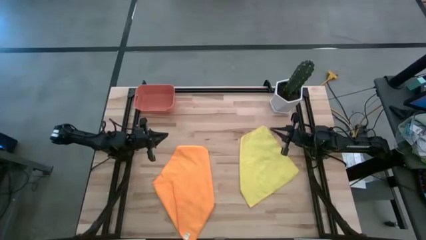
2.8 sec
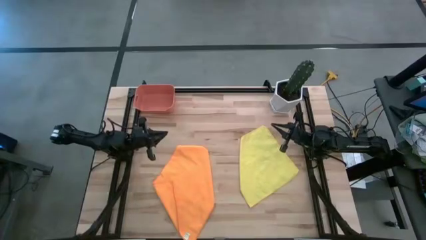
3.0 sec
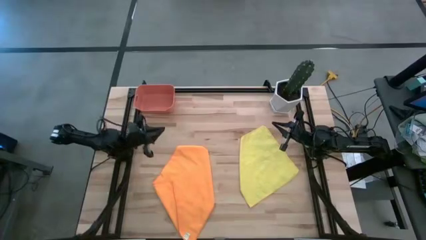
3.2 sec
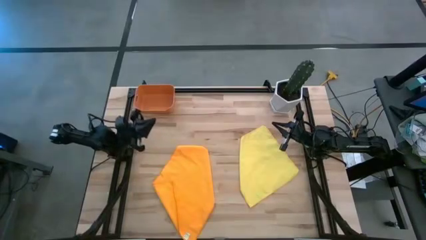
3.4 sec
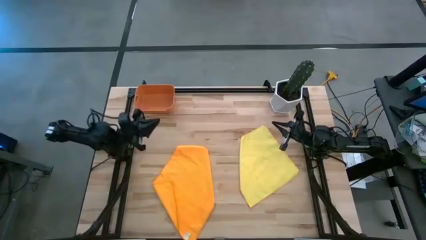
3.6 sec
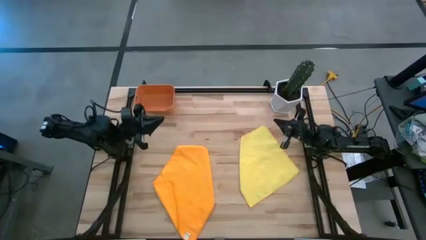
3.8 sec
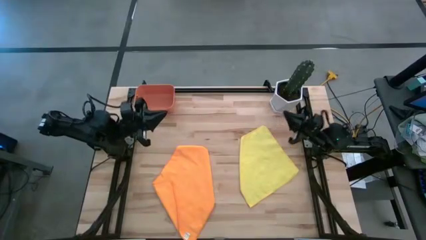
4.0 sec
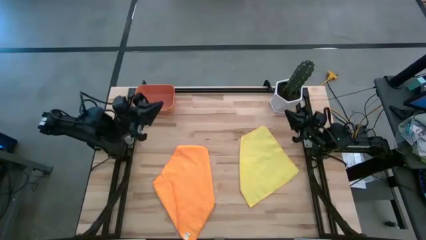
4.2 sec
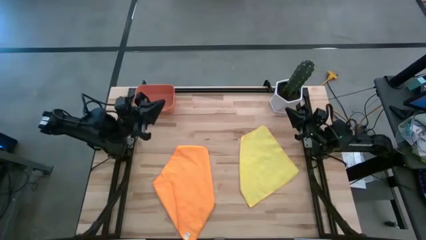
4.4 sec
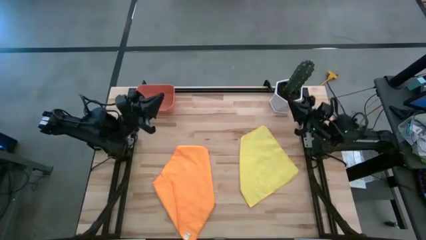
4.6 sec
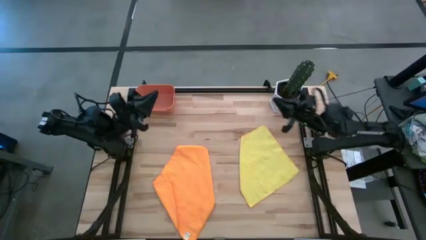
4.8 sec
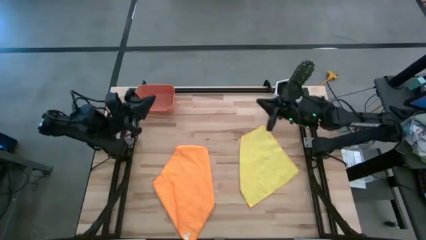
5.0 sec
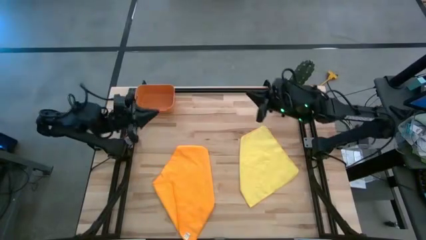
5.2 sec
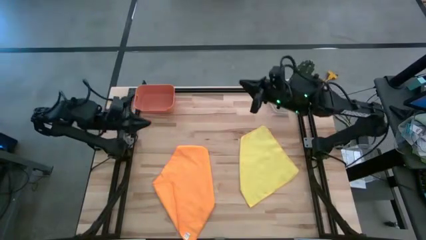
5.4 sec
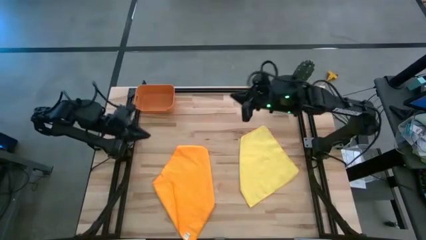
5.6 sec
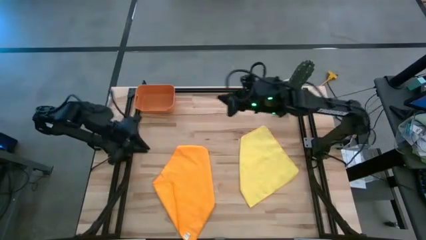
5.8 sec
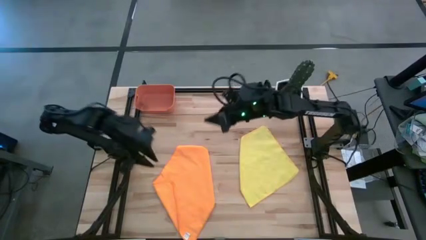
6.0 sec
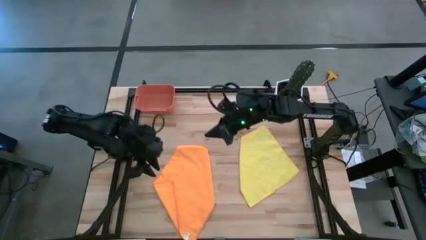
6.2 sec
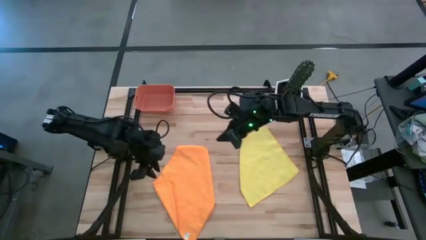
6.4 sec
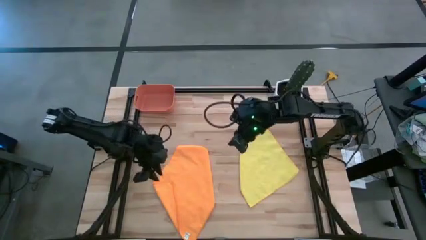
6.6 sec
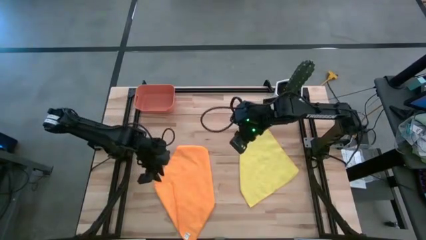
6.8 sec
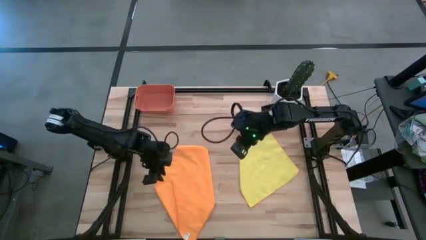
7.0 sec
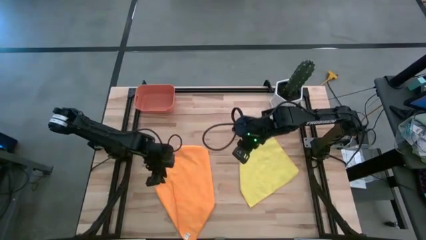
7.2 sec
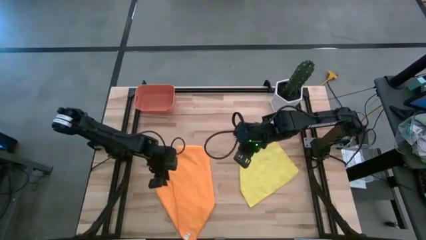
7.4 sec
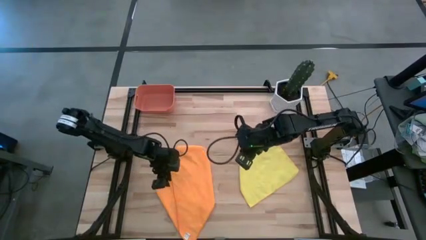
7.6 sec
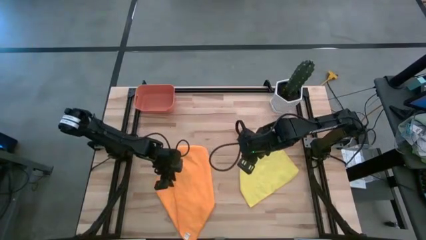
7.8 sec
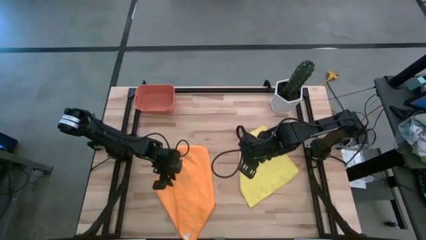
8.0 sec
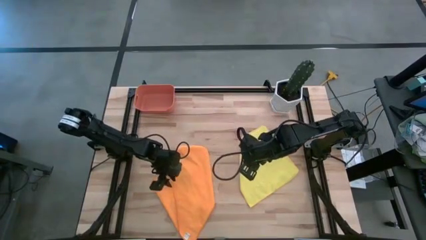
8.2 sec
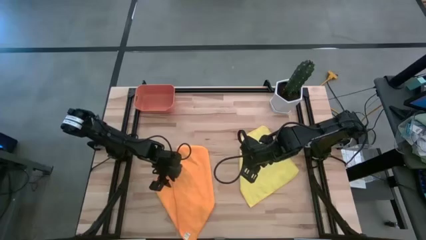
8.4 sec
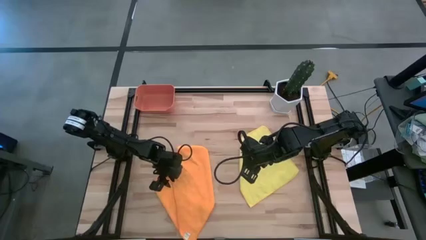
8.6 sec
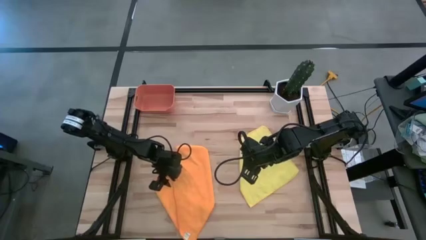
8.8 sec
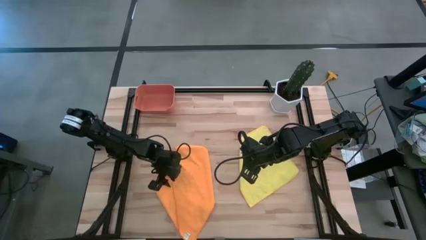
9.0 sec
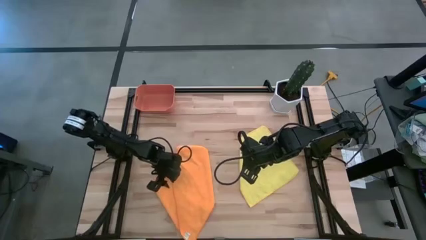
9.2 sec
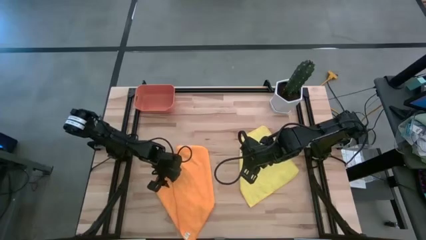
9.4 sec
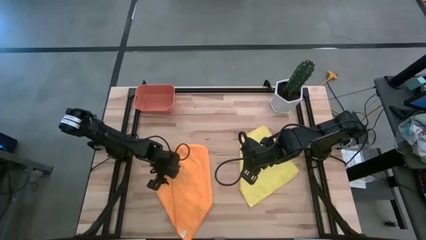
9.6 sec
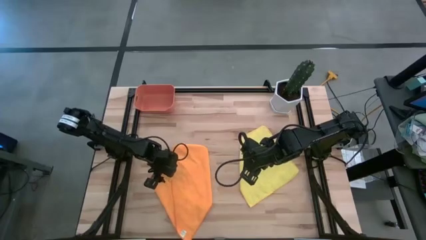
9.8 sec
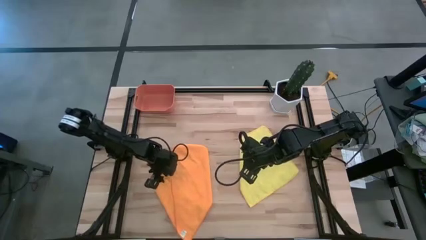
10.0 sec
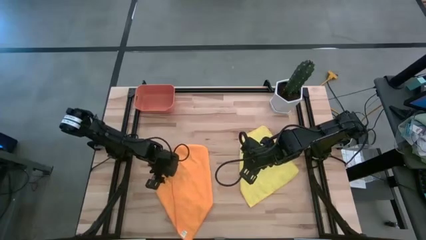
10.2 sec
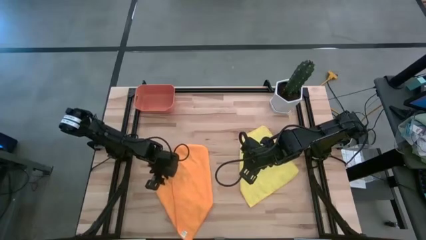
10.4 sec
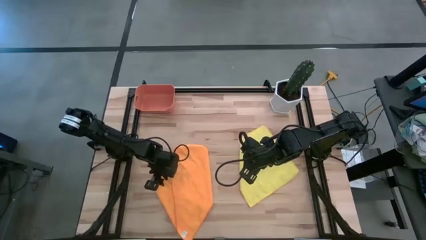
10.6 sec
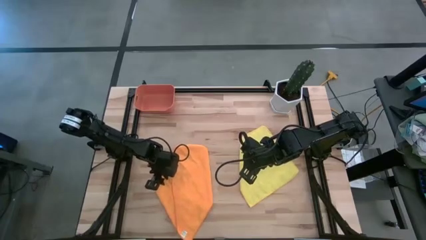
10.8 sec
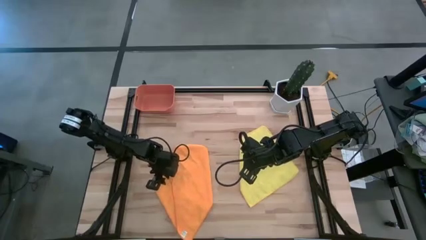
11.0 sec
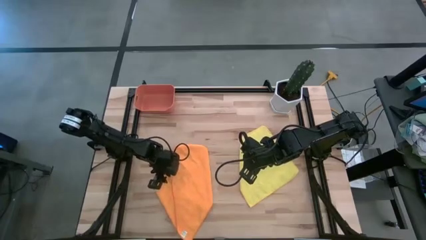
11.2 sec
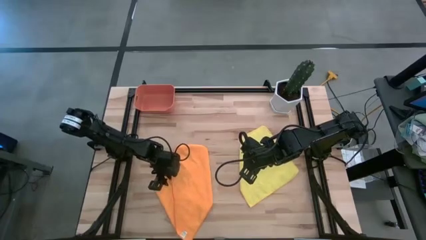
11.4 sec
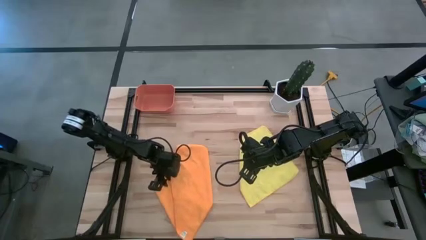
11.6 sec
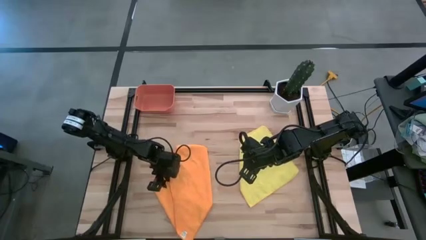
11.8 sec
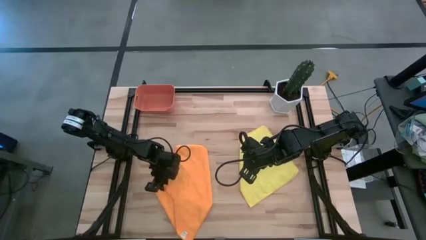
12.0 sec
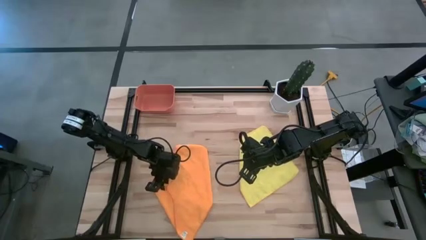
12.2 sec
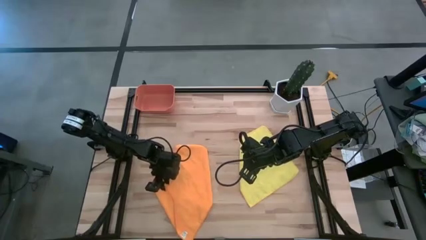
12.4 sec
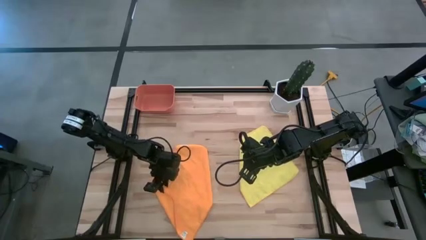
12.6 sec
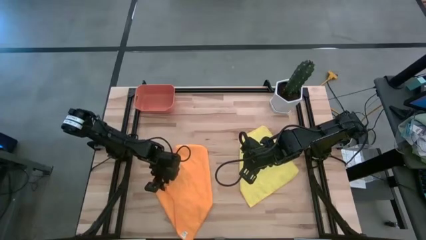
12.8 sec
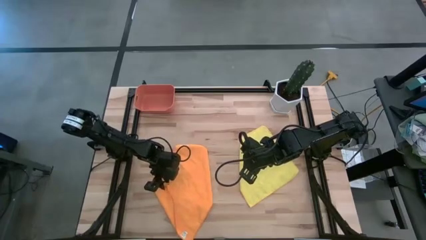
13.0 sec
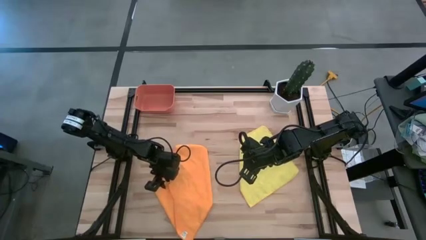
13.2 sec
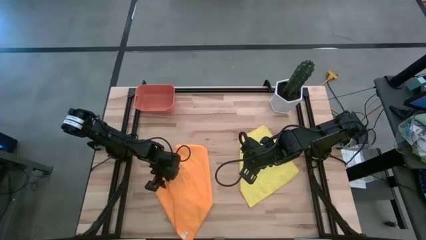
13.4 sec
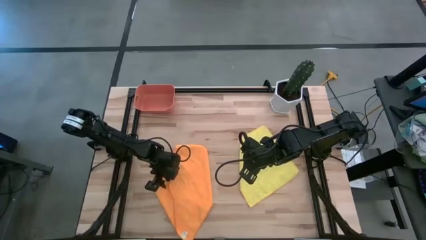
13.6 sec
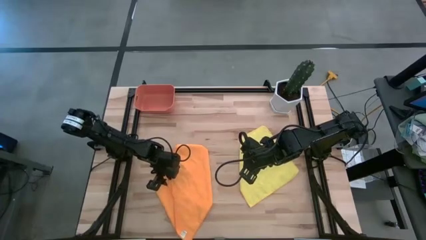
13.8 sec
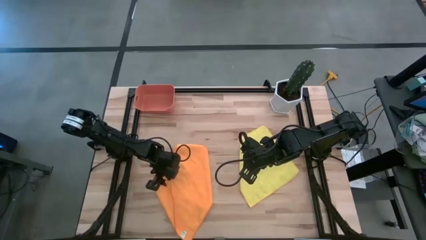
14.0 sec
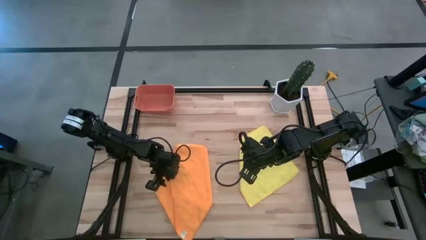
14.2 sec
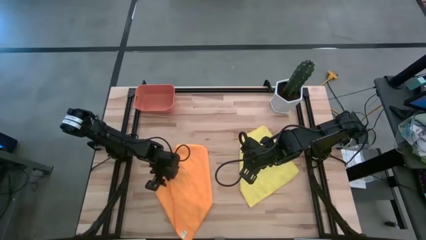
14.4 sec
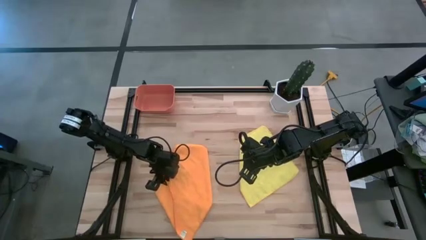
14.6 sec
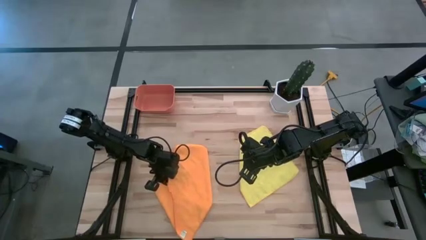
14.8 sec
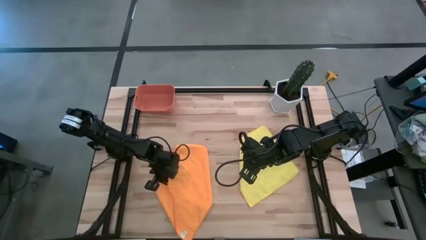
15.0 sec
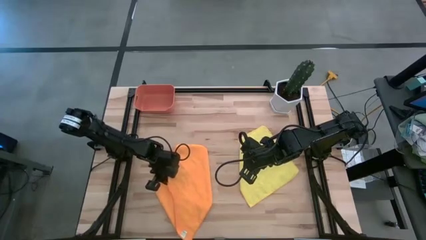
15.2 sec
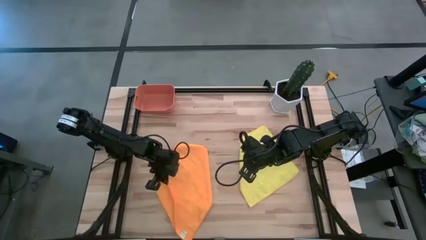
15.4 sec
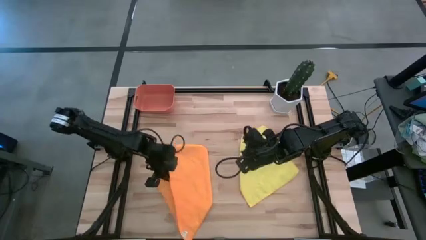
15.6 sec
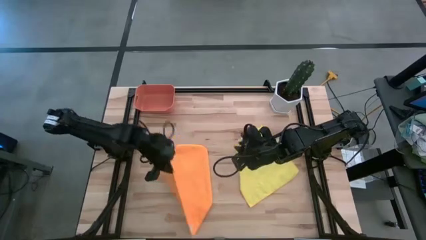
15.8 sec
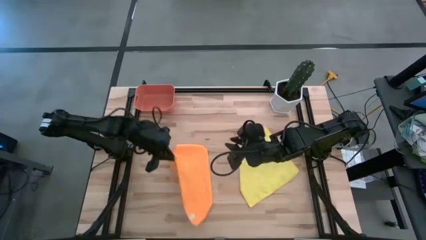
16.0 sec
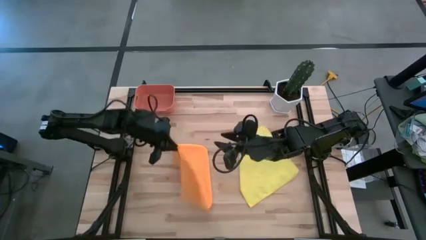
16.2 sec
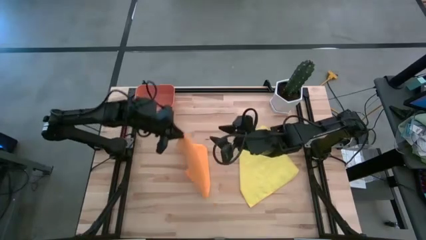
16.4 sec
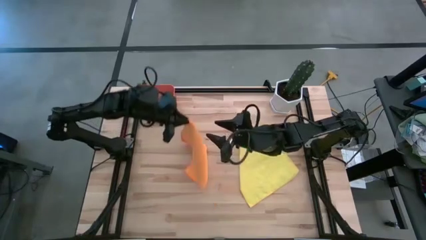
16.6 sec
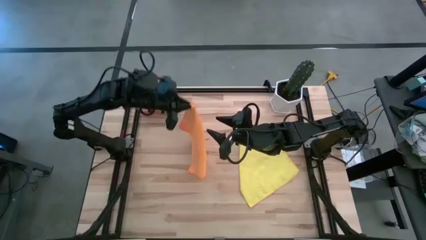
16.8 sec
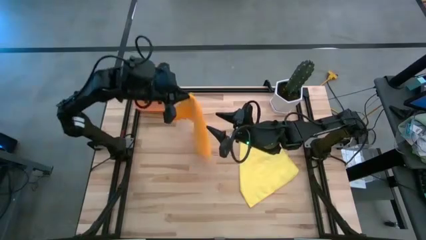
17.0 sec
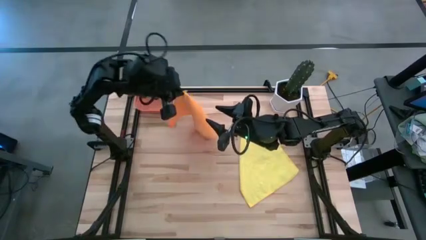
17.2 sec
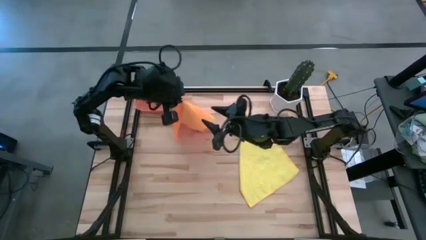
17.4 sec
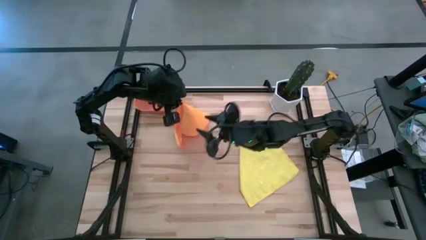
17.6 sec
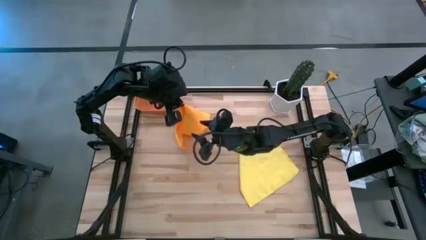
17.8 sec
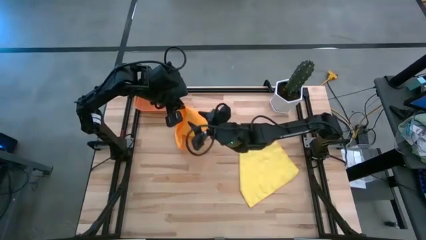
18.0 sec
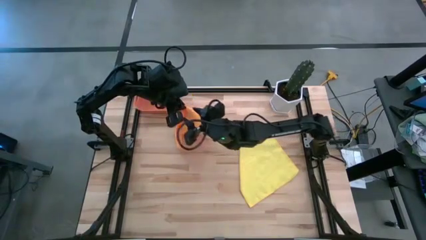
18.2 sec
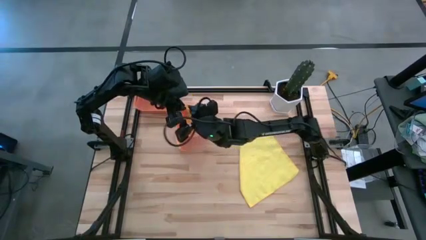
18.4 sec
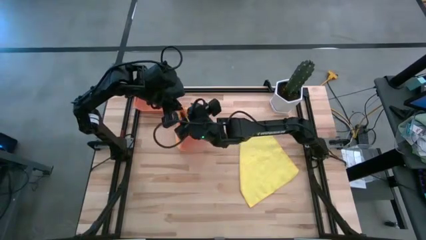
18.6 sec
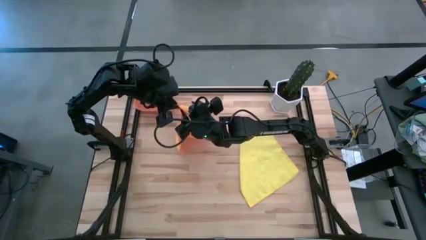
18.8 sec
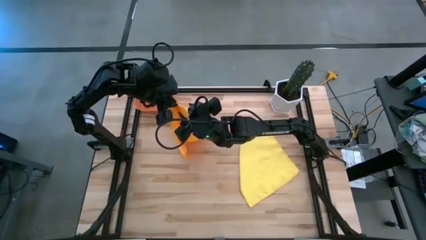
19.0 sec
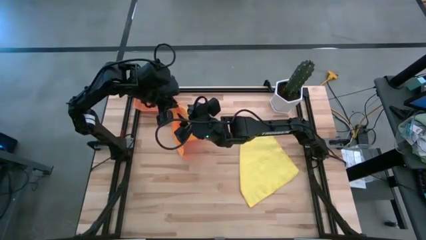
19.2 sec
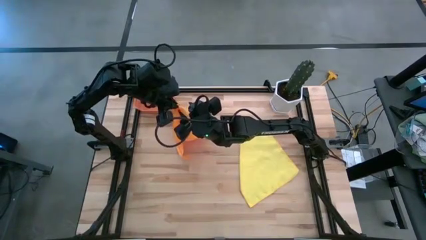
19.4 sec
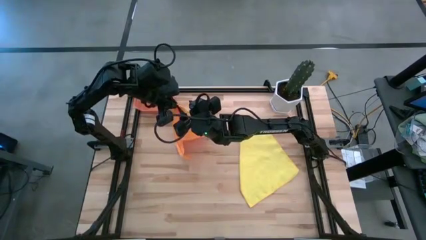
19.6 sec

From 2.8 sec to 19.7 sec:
Task: Roll microfiber towels into tight, uniform cylinder then place into a basket
Fold the orange towel
